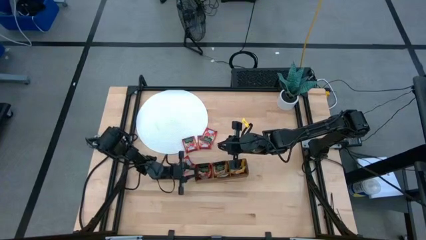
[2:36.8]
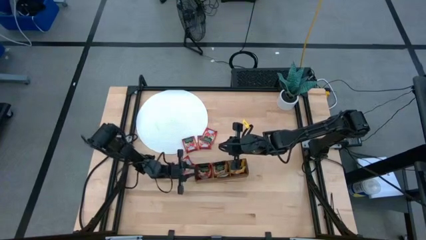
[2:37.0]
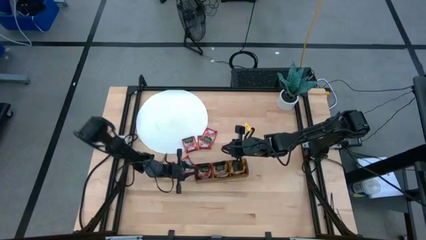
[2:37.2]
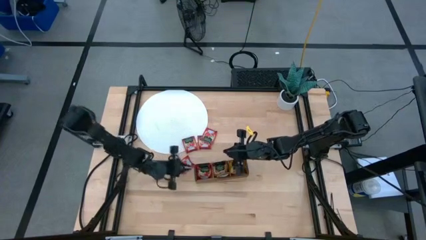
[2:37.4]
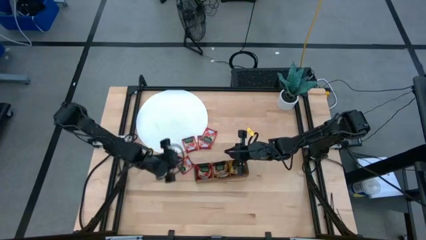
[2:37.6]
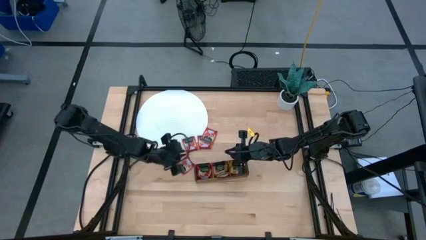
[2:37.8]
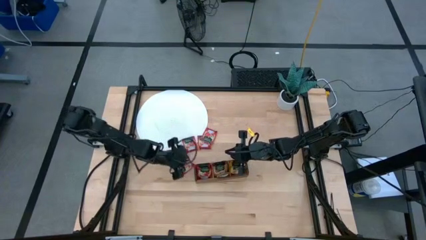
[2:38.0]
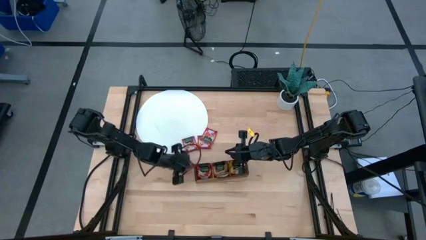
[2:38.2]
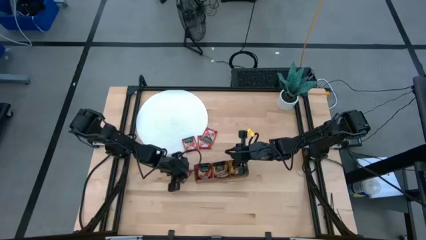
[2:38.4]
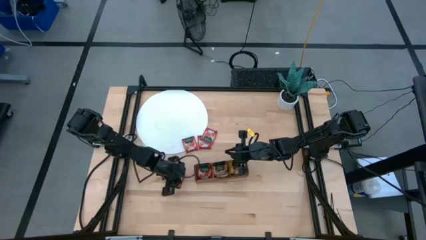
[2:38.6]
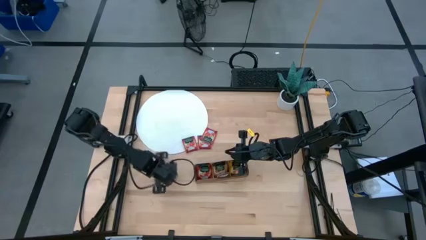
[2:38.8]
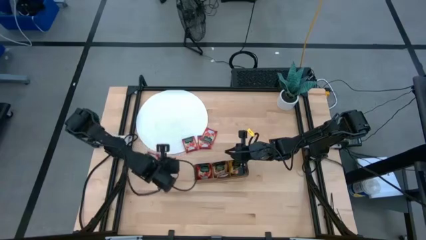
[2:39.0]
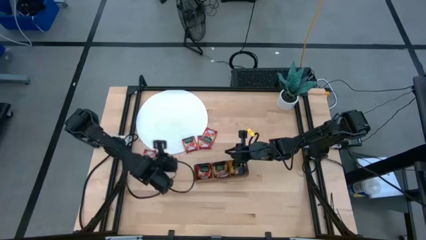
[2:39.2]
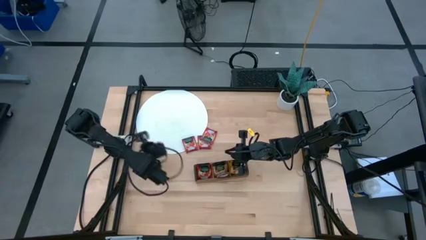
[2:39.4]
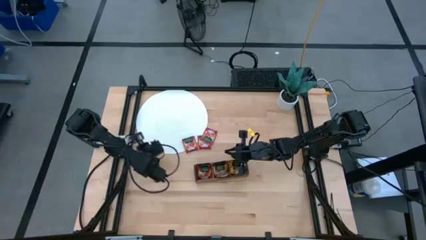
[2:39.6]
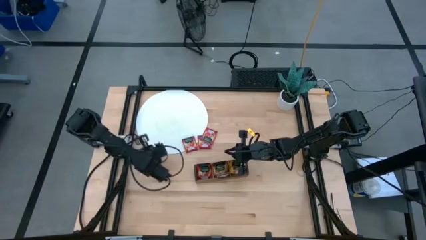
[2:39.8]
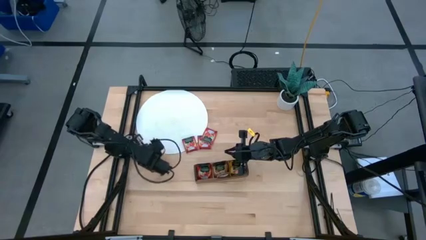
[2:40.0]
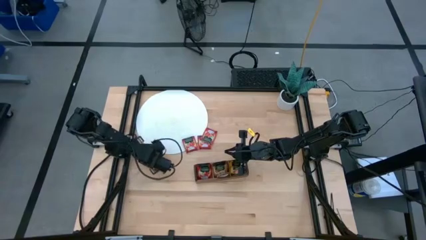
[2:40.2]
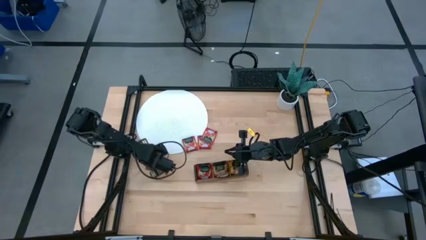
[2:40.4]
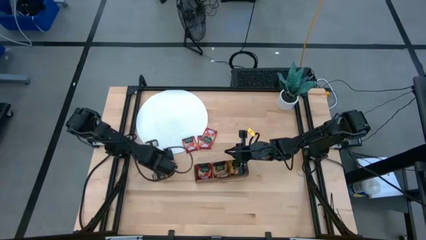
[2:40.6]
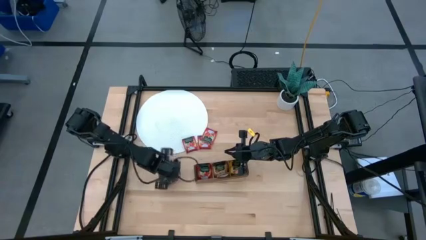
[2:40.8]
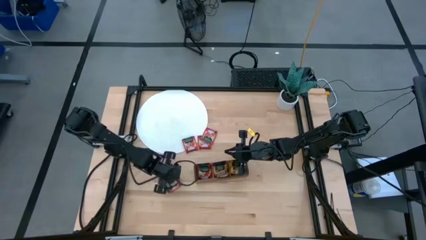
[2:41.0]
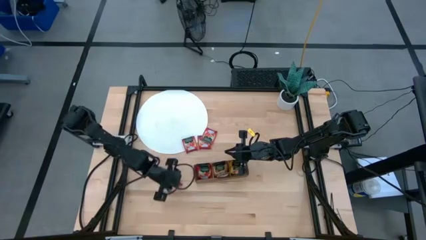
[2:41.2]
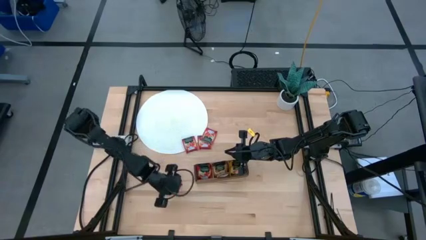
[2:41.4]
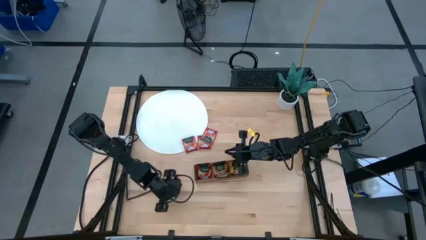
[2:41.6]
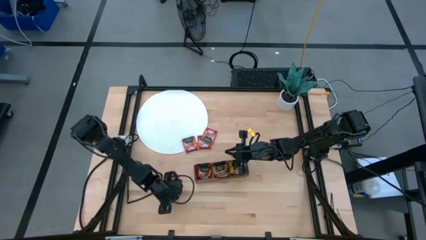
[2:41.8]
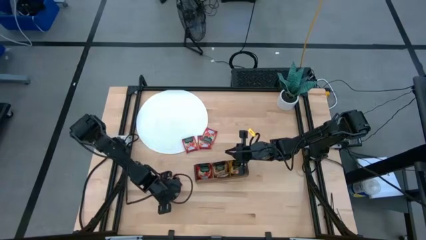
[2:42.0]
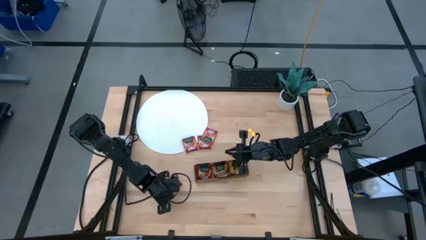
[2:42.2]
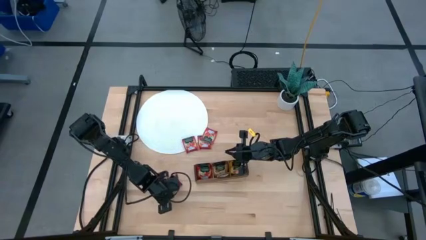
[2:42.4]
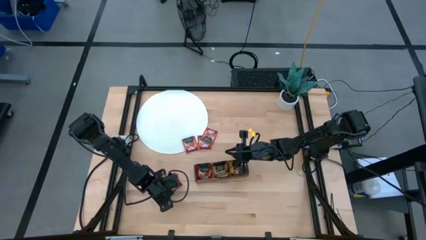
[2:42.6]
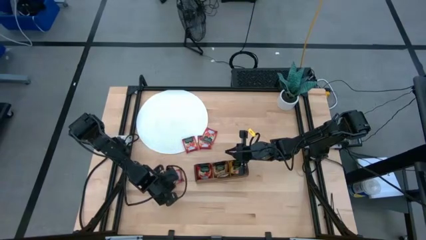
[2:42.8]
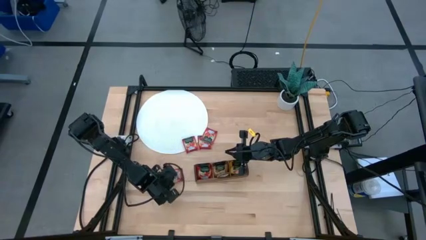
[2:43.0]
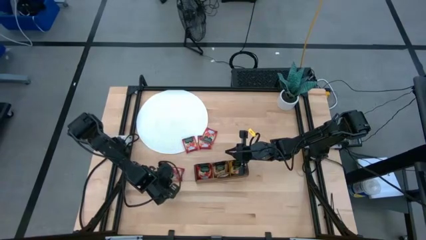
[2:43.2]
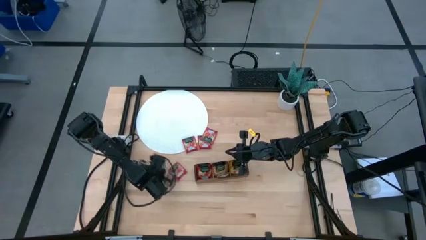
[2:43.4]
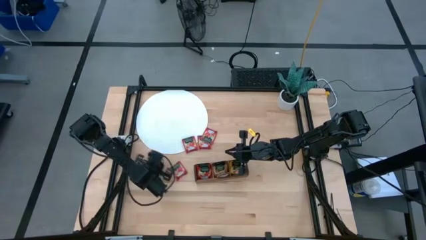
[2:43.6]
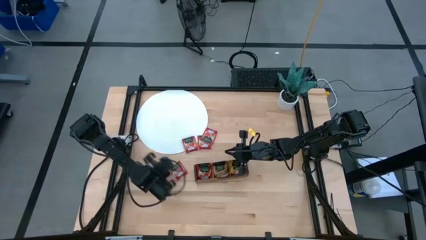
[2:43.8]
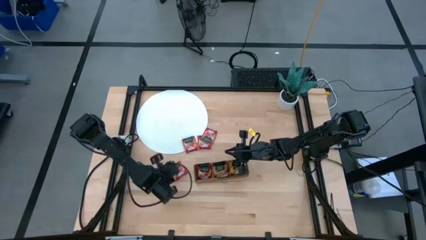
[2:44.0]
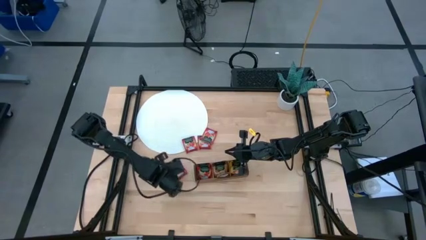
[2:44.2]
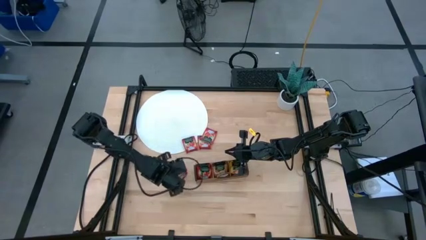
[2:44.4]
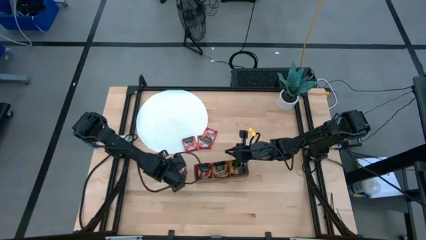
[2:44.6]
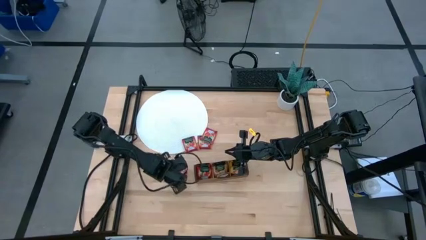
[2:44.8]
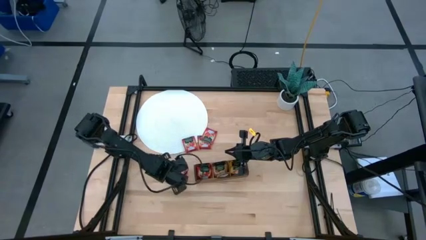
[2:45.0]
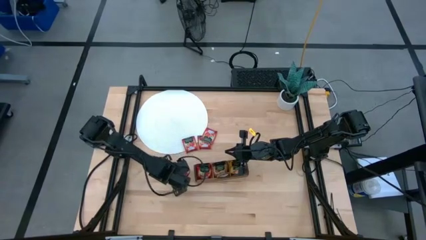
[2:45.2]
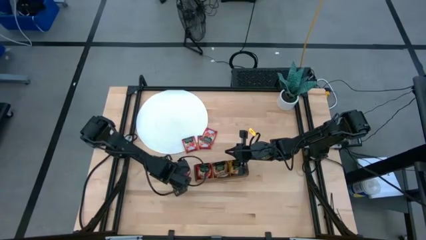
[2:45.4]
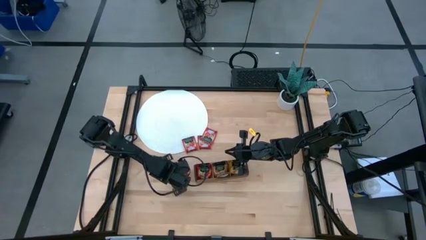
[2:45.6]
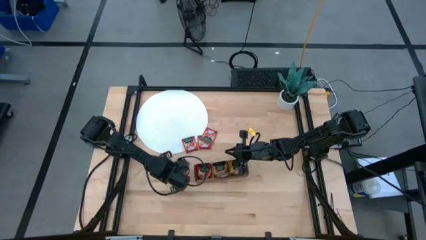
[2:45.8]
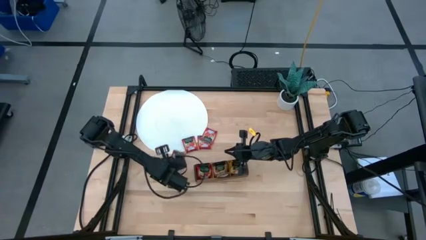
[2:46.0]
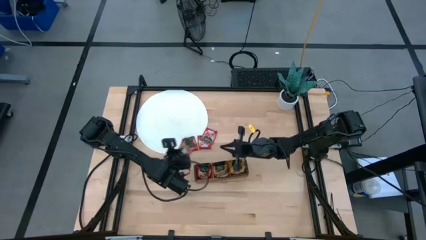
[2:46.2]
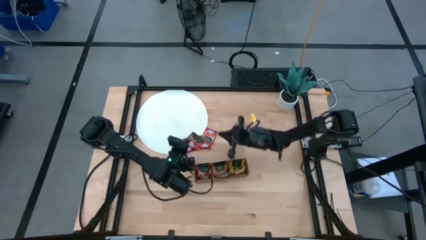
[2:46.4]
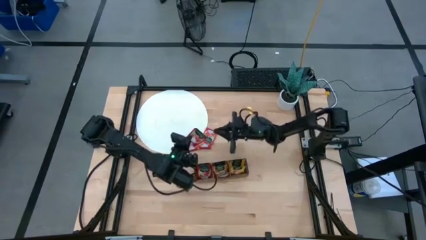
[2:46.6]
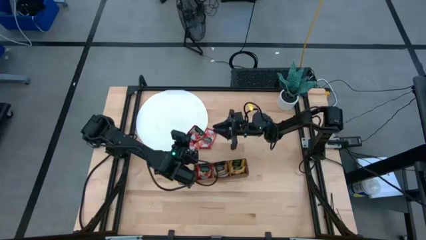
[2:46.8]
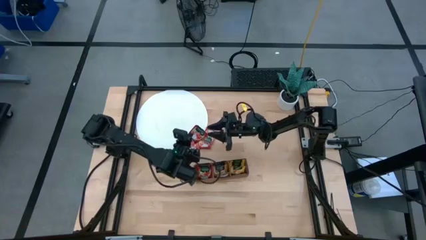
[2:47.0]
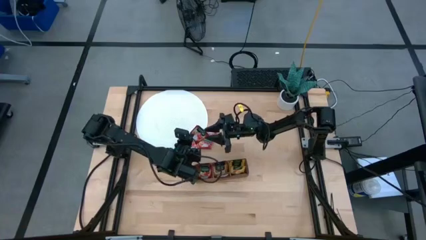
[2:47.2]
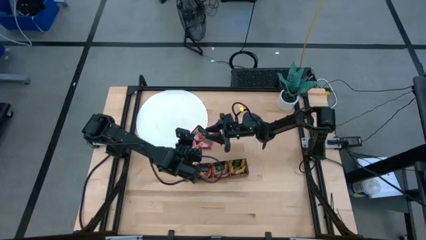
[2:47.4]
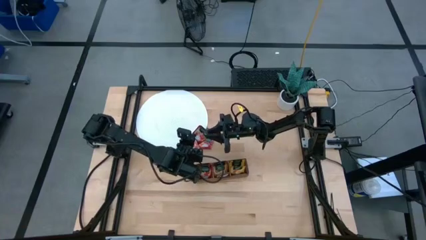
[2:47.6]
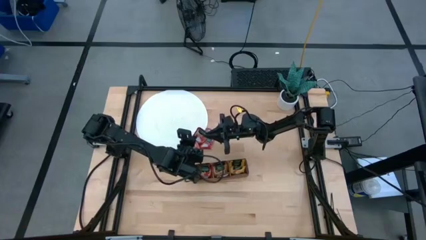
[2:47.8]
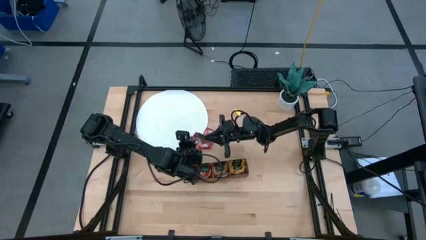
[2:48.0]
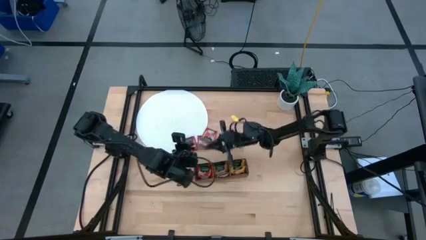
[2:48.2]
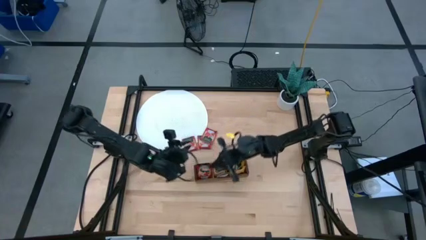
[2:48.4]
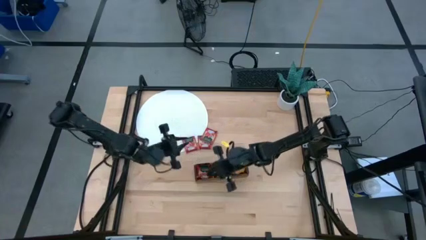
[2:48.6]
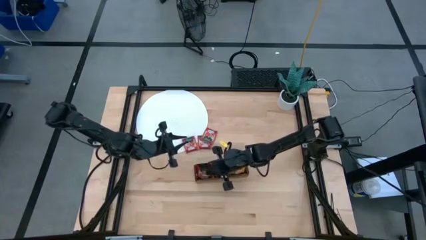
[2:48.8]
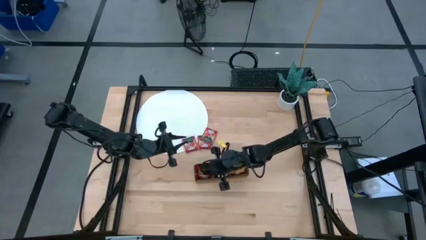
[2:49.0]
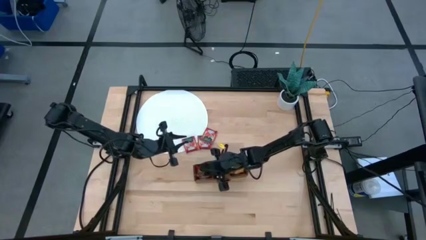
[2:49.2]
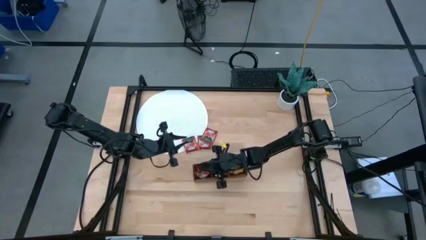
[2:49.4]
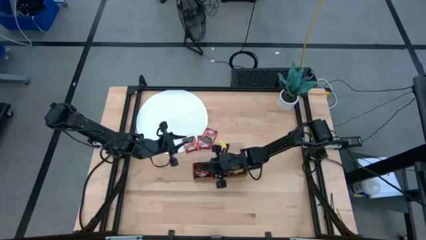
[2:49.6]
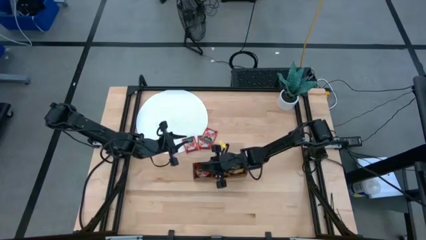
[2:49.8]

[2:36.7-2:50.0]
Task: Pick & Place Tea
Put the red tea bag into the left section of the wooden organizer

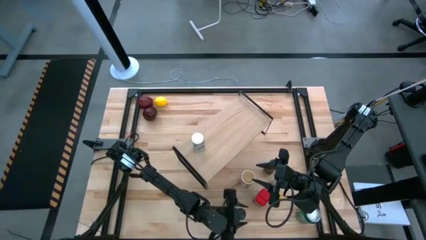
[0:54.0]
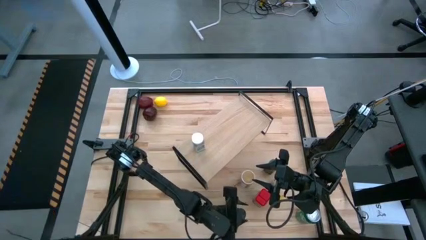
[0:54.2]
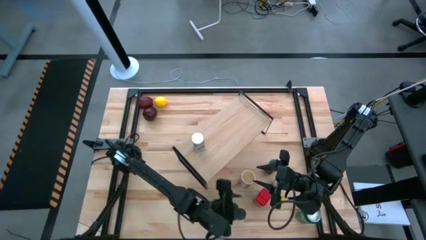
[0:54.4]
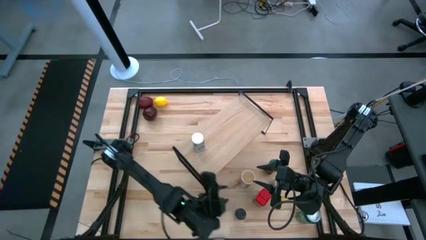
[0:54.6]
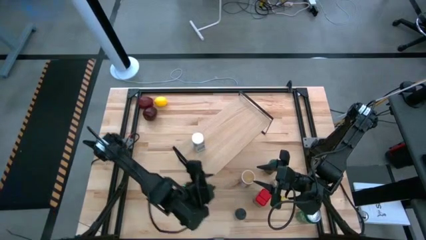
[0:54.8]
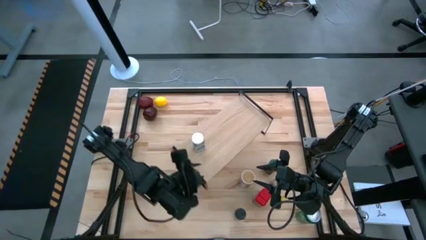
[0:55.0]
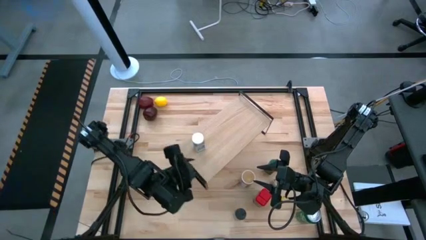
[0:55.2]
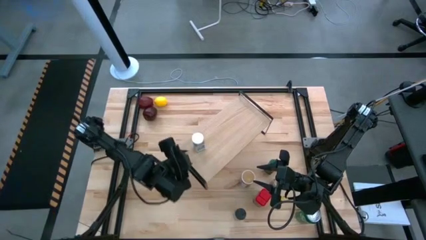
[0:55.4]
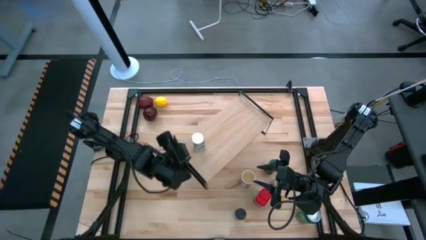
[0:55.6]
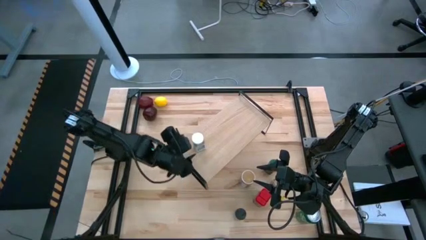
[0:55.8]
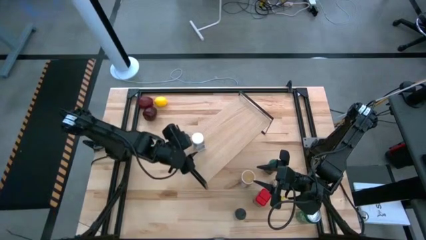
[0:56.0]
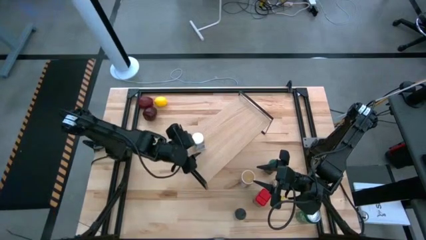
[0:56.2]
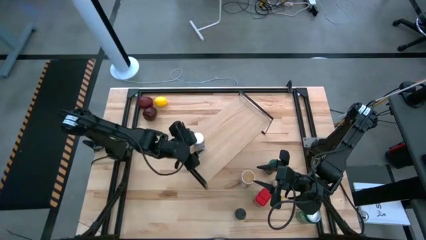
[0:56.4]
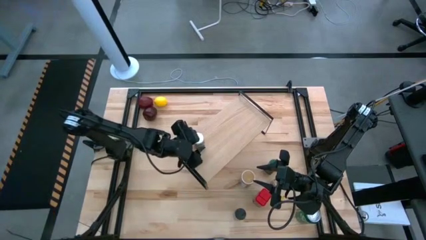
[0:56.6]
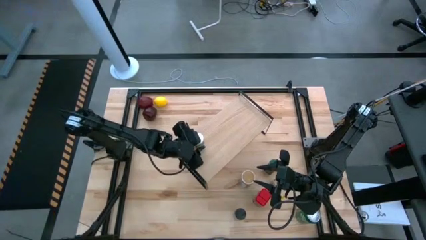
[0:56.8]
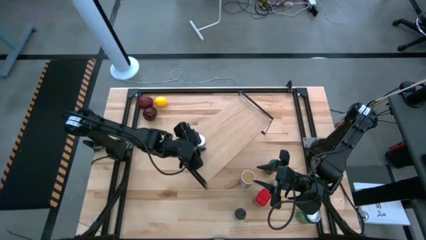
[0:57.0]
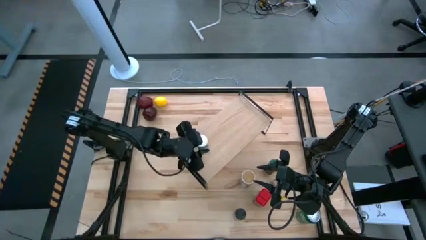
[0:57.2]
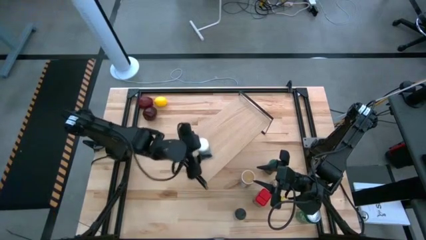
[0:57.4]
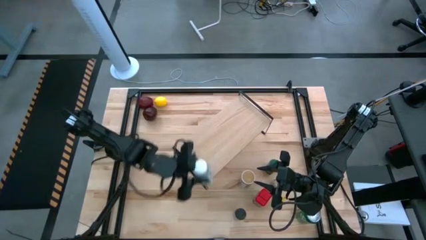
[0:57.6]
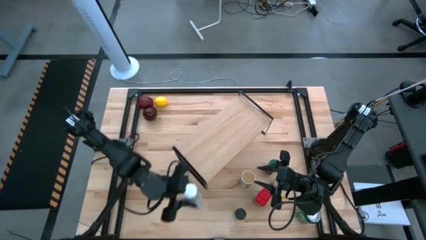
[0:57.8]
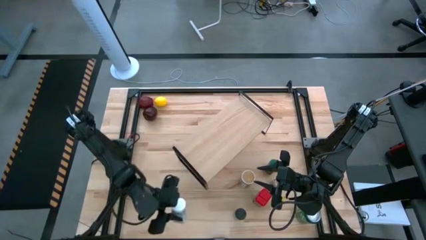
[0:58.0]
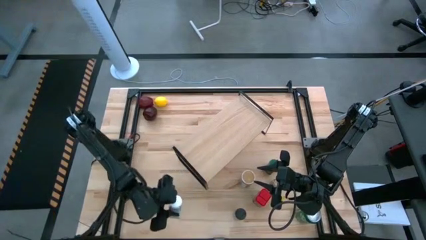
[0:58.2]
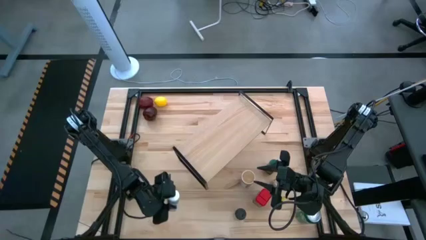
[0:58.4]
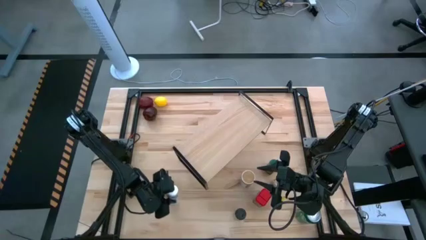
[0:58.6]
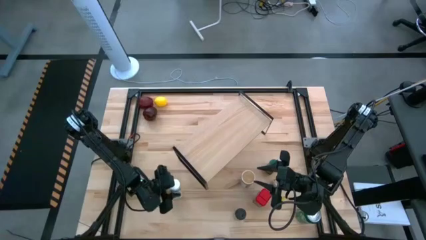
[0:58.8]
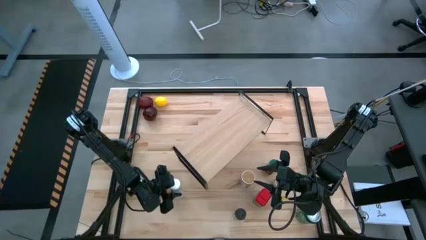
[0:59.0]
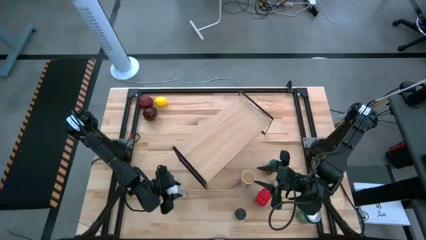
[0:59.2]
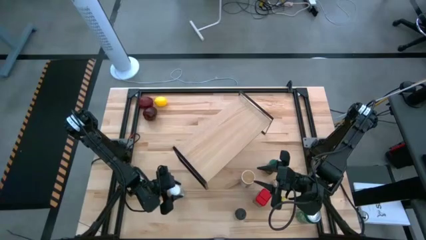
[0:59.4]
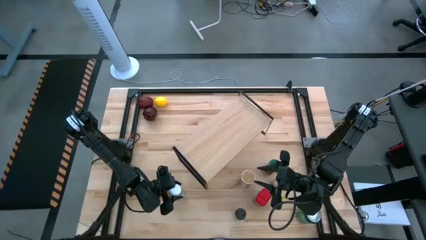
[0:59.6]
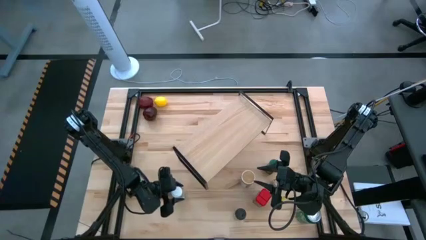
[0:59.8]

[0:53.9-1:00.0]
Task: Shelf spices
Remove the white seasoning bottle from the shelf
